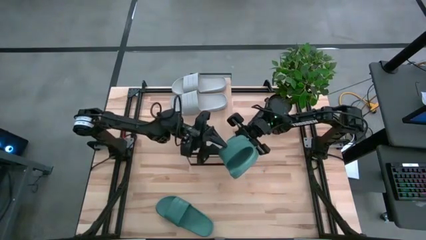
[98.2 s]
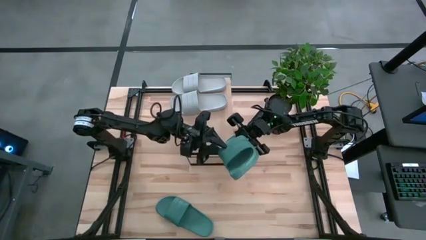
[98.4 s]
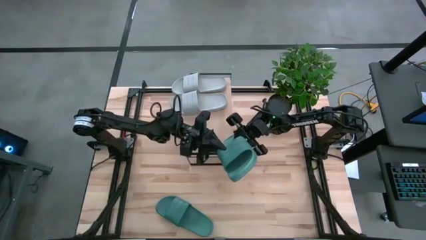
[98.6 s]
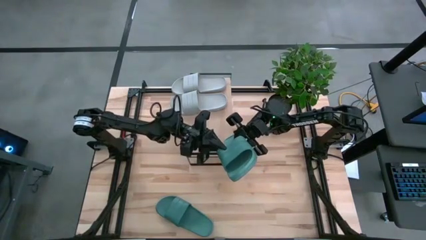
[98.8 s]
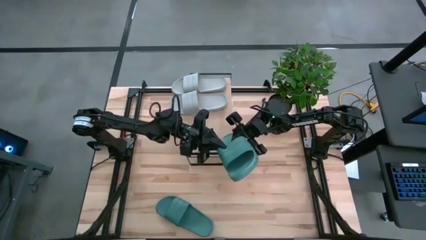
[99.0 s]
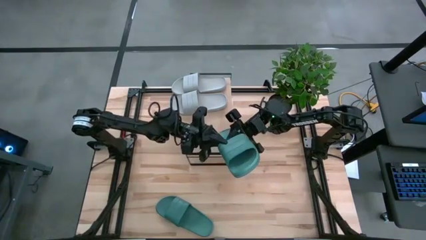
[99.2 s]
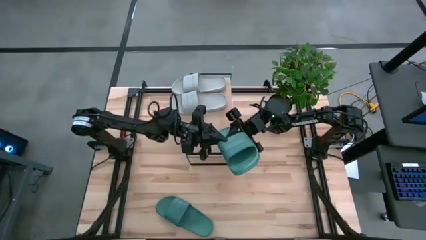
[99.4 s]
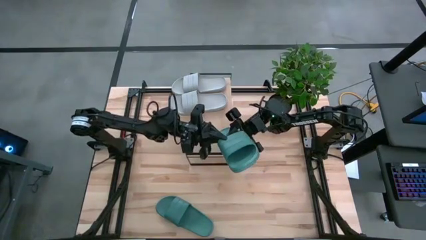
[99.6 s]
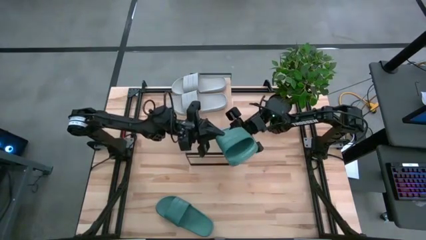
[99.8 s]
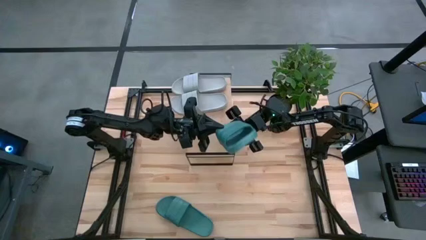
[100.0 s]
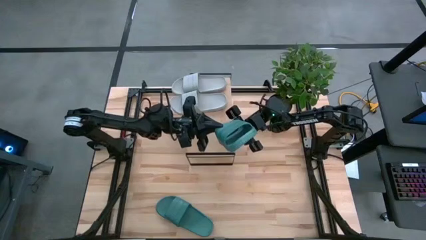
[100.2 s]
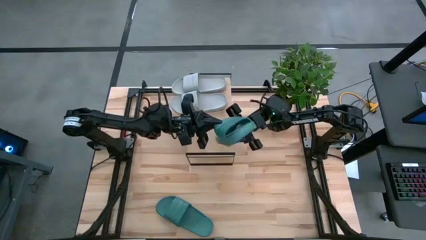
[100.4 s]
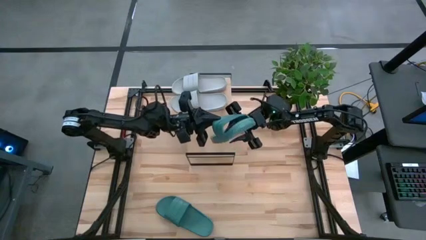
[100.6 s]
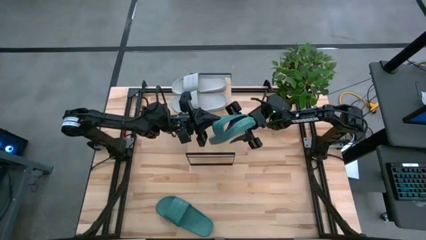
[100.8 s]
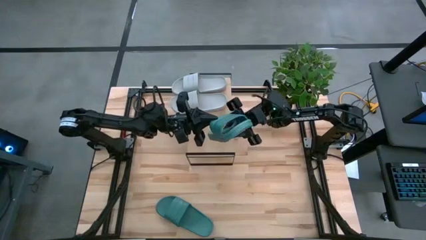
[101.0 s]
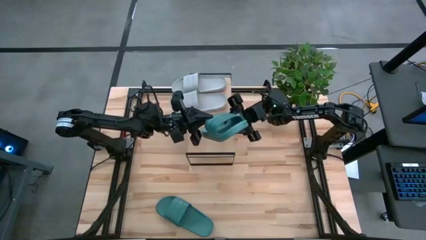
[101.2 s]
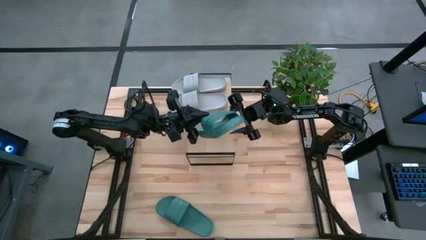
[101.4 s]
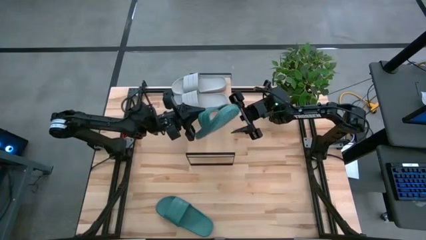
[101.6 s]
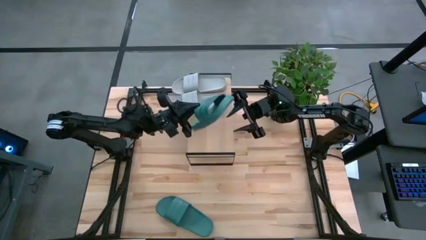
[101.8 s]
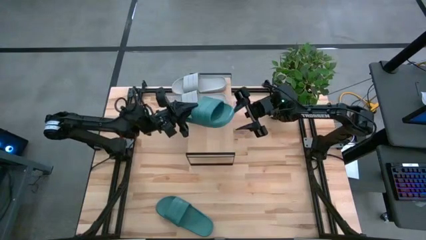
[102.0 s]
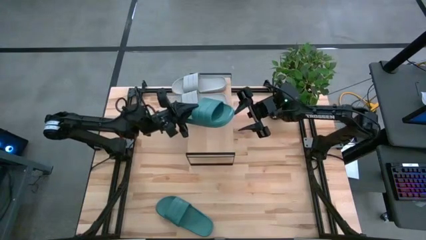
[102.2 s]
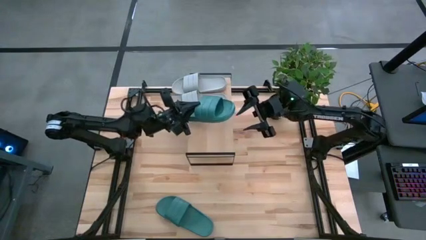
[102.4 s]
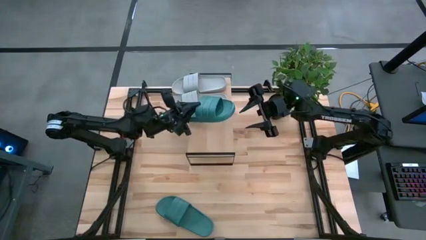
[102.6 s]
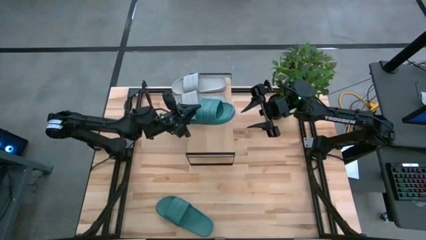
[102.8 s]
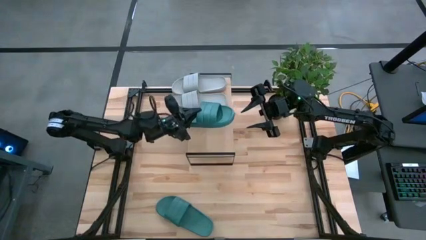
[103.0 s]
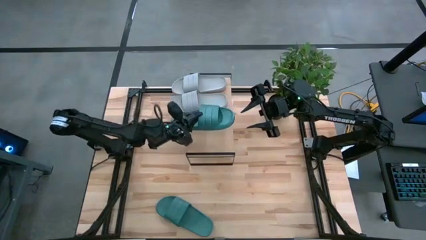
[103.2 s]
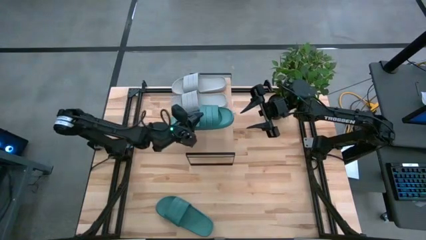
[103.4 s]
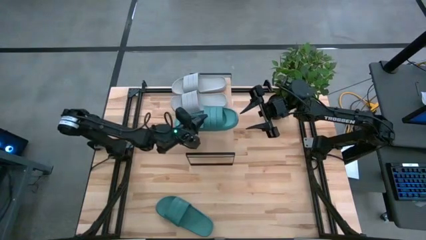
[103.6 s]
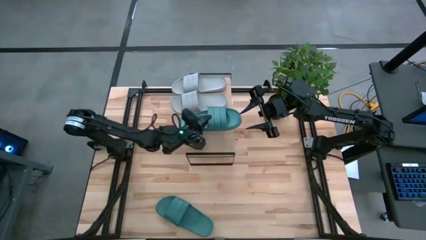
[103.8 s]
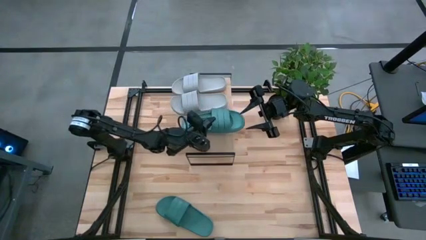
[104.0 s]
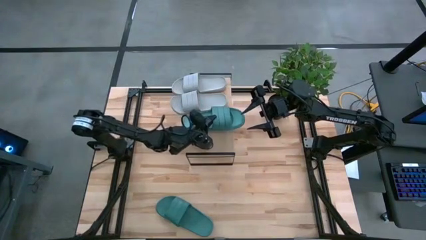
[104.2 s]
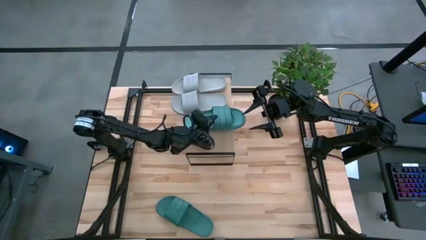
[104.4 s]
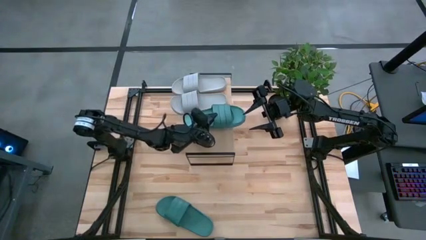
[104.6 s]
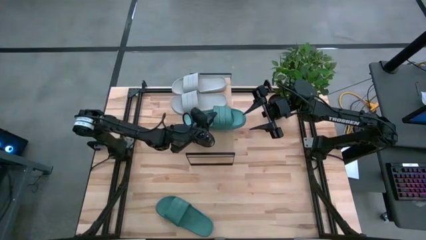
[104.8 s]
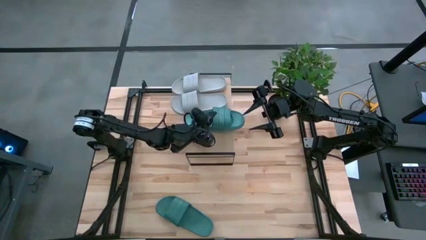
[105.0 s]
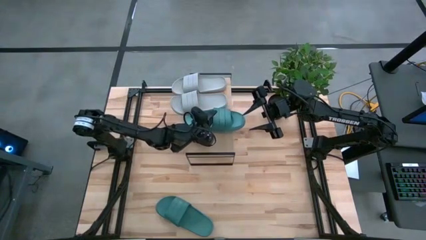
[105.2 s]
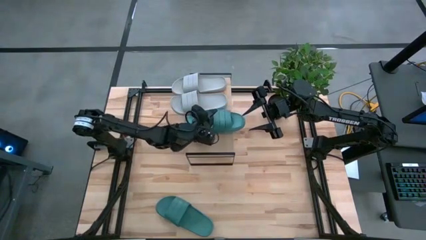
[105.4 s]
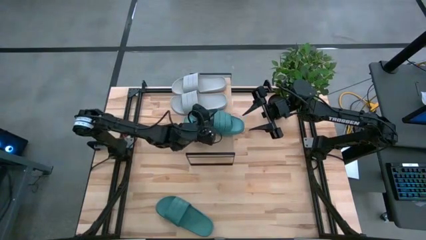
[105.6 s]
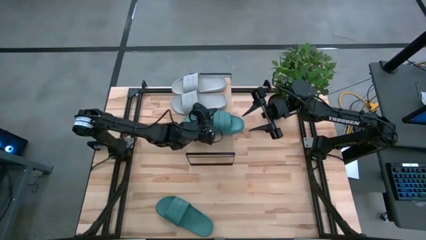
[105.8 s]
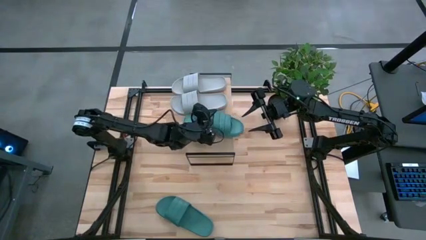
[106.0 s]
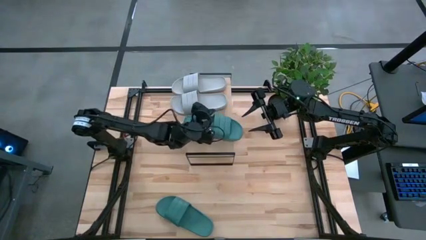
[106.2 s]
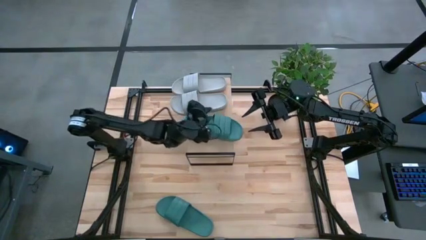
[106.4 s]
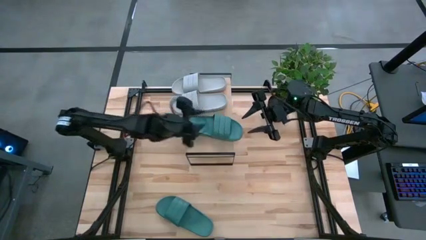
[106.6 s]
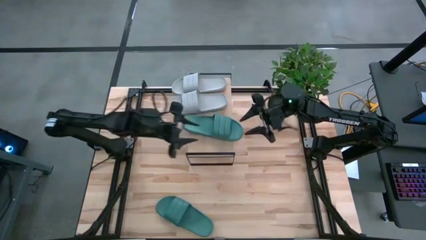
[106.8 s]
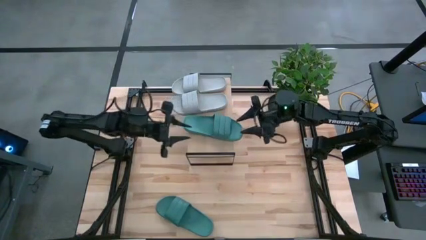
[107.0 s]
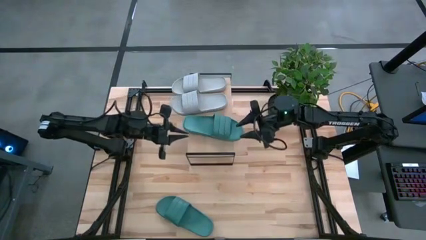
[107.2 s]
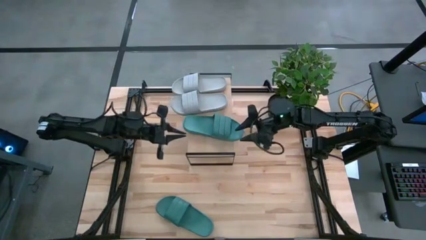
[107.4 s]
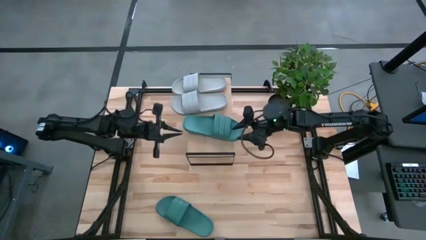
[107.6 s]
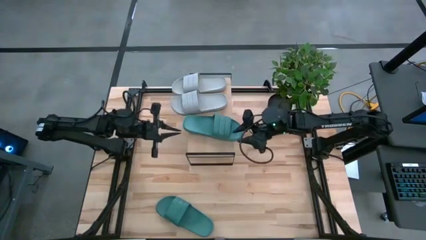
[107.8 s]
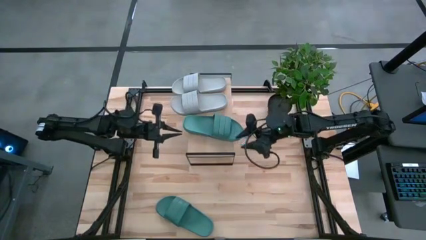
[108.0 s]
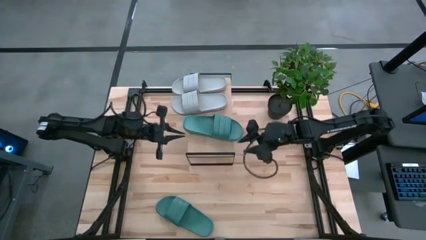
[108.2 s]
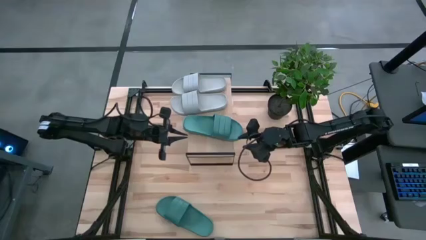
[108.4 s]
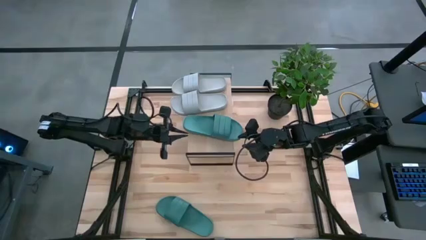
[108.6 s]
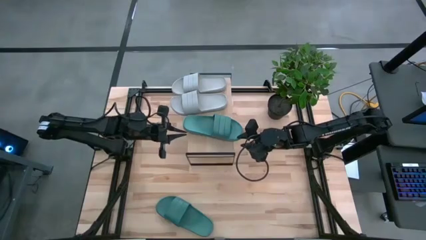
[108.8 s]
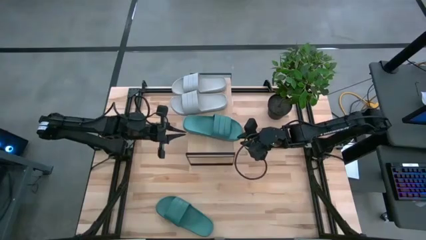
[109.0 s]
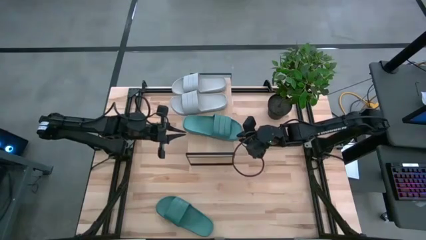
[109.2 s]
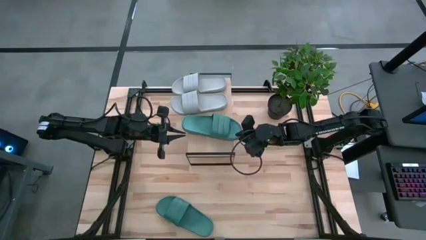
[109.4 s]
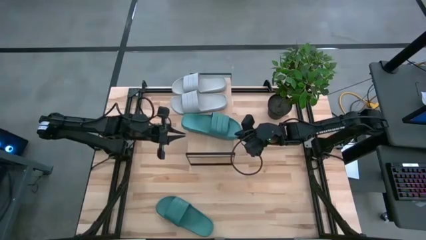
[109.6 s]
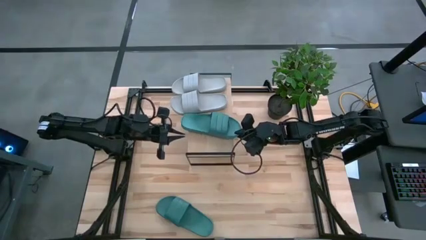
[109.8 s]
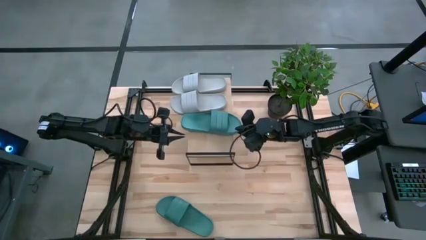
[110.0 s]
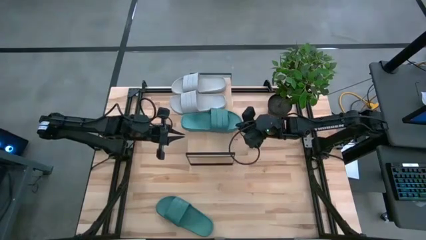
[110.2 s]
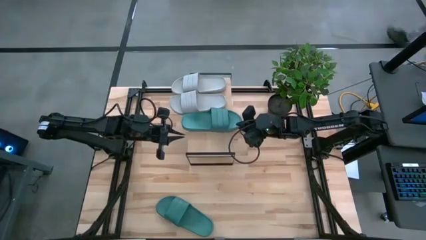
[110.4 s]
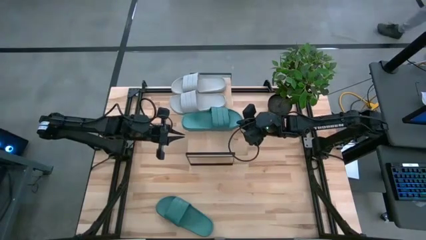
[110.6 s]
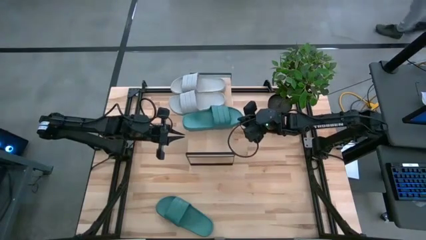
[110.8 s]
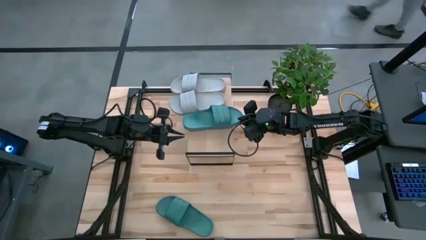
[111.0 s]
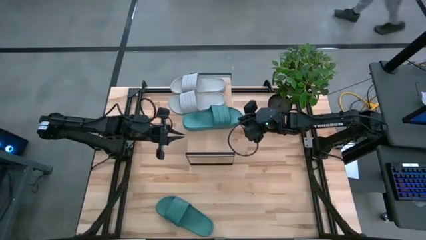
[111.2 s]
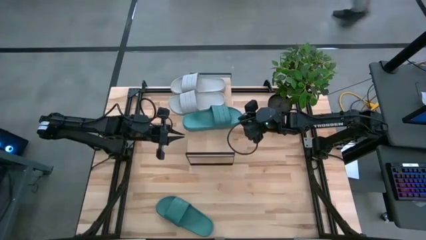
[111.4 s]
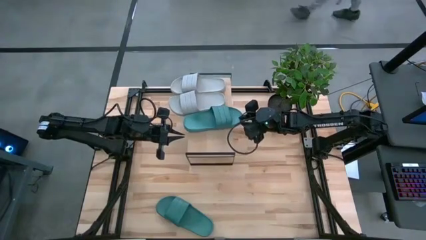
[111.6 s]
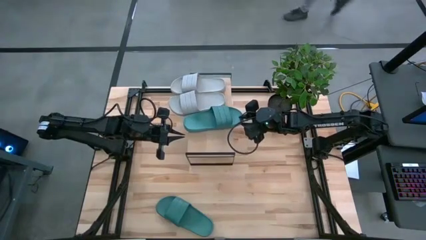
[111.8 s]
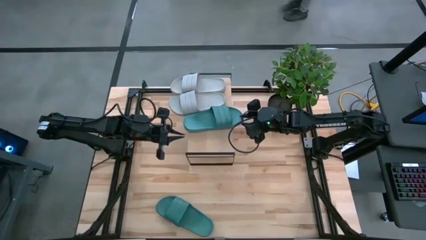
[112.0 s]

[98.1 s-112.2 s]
Task: Pick and place slides into the shelf
Put the left blue slide on the shelf

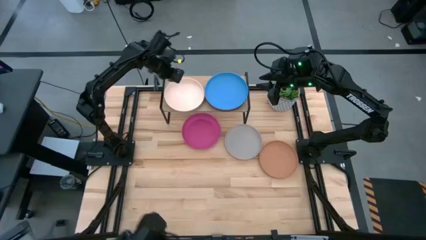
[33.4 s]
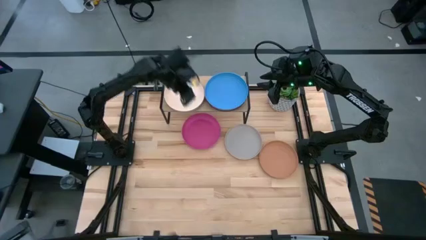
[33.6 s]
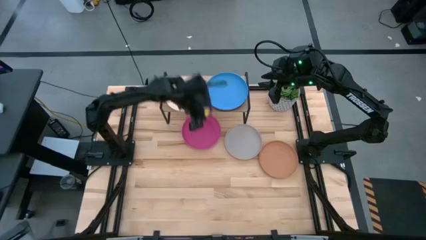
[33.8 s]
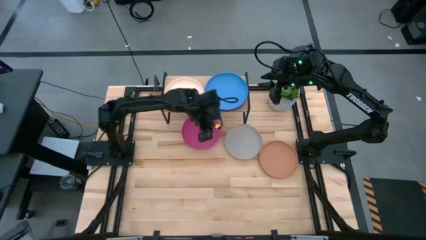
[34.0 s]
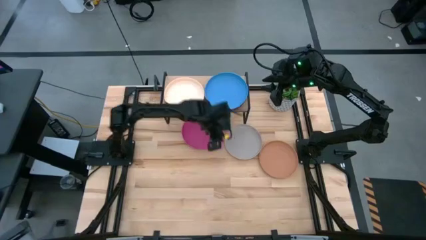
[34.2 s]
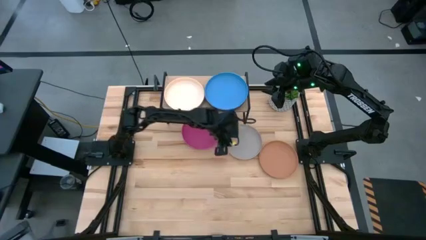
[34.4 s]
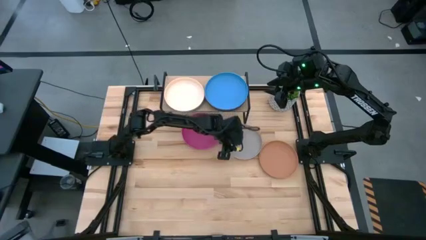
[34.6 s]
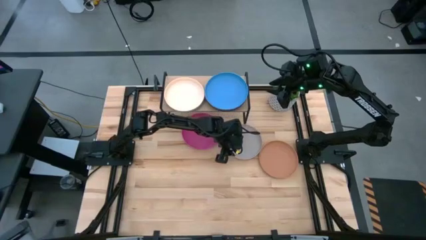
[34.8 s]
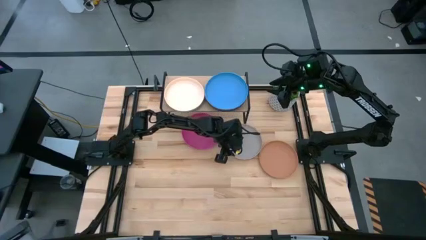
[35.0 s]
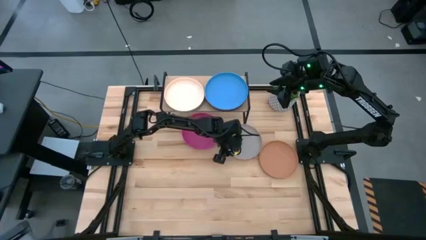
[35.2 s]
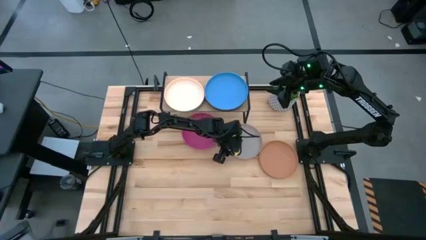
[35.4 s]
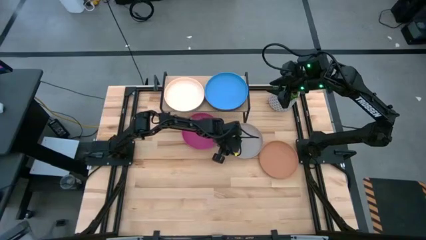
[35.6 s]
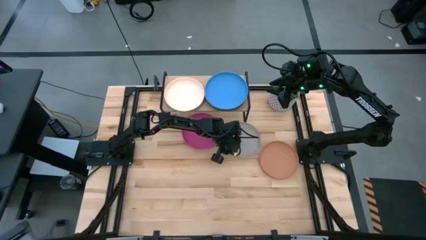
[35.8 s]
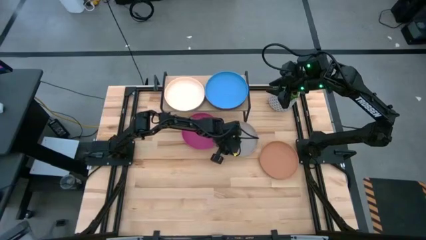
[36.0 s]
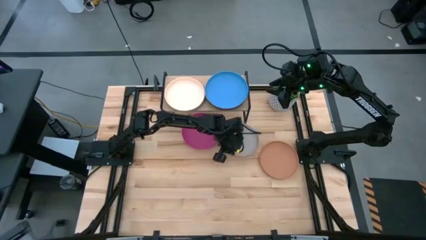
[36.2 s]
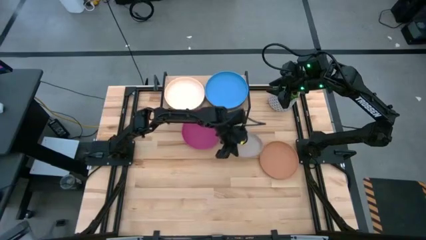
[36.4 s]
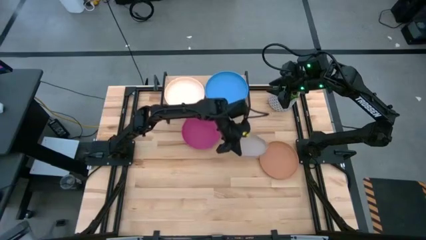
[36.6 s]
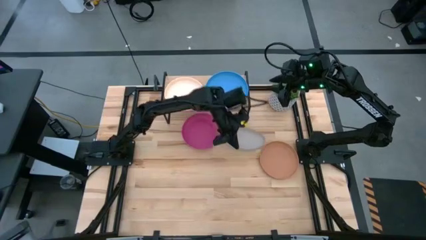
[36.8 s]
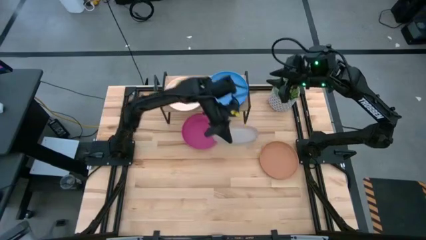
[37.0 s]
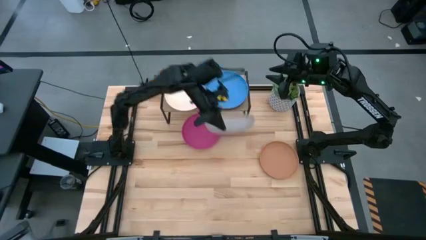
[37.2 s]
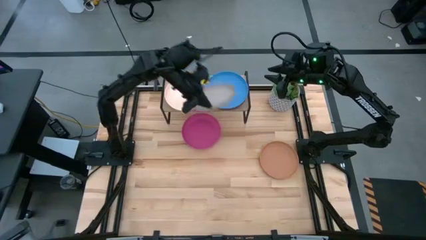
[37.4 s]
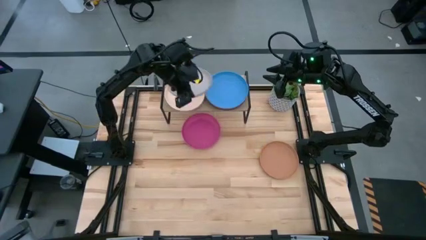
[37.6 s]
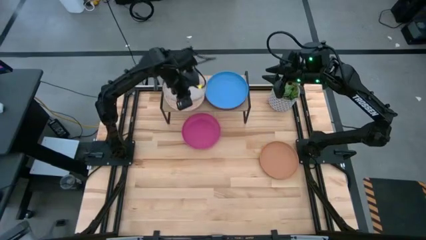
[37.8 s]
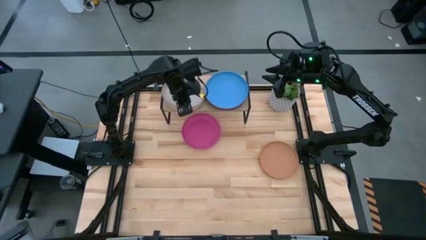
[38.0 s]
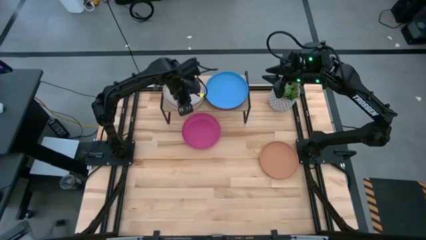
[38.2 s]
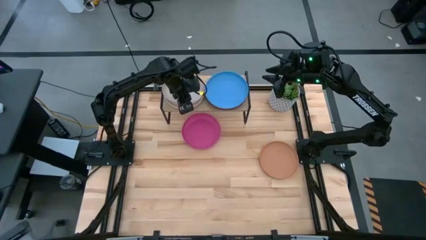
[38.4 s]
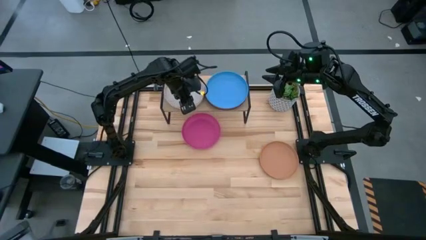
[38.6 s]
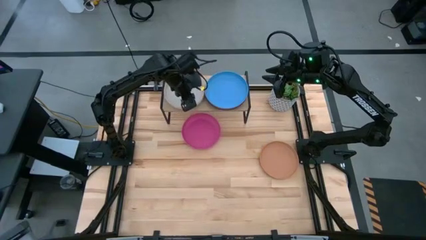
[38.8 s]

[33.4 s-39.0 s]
Task: Place and stack plates onto a shelf
Stack the gray plate on the light orange plate on the shelf
